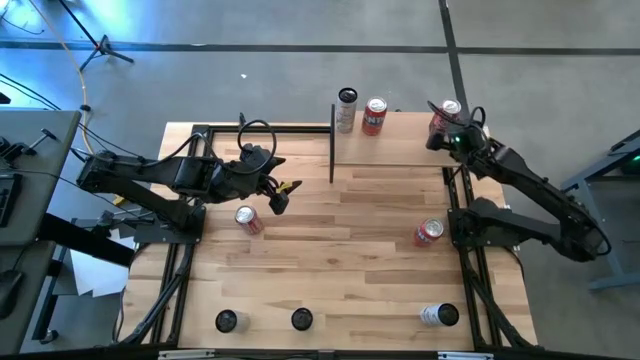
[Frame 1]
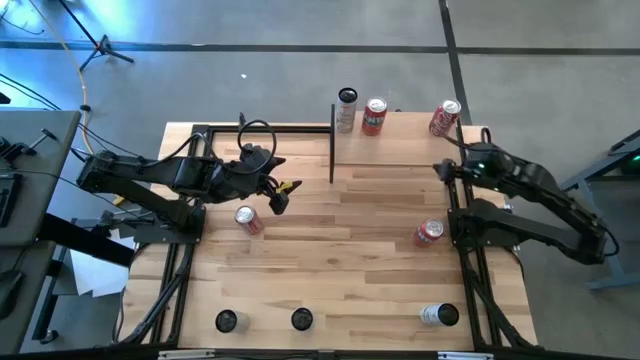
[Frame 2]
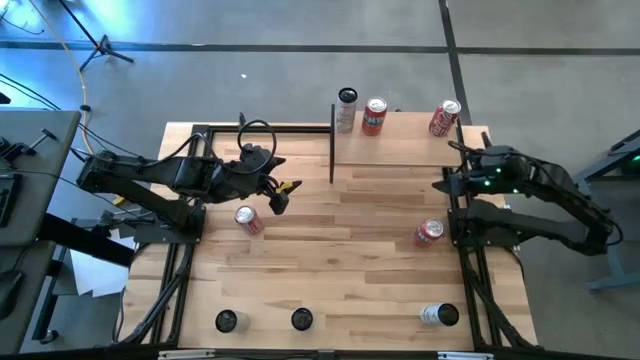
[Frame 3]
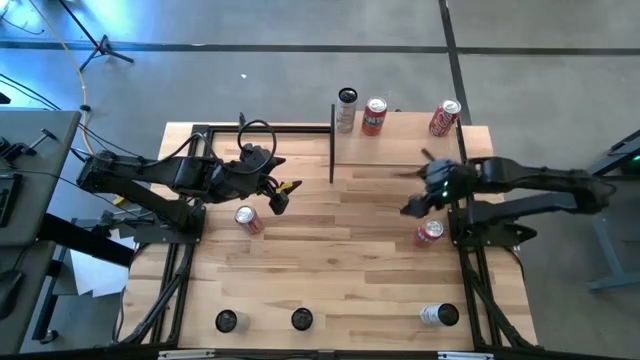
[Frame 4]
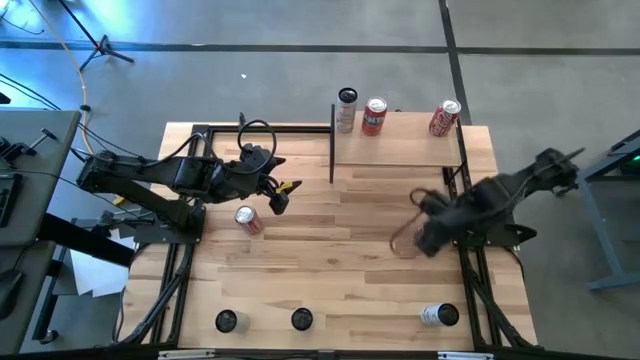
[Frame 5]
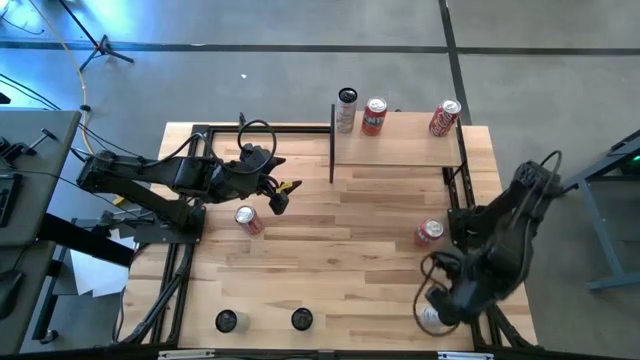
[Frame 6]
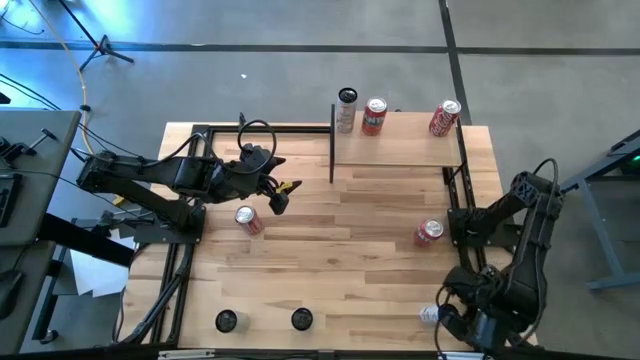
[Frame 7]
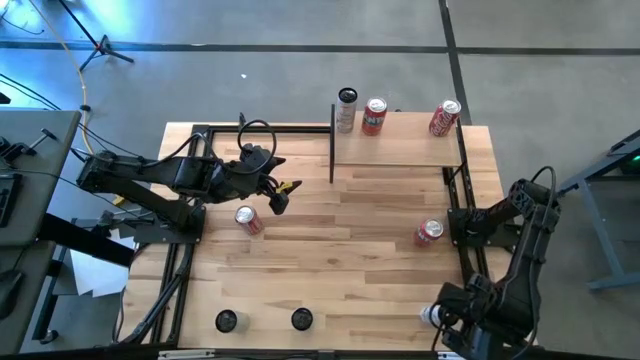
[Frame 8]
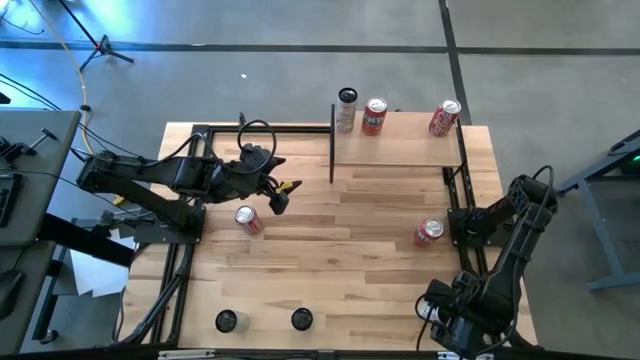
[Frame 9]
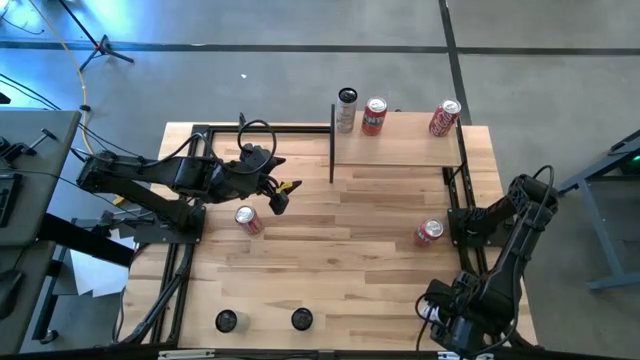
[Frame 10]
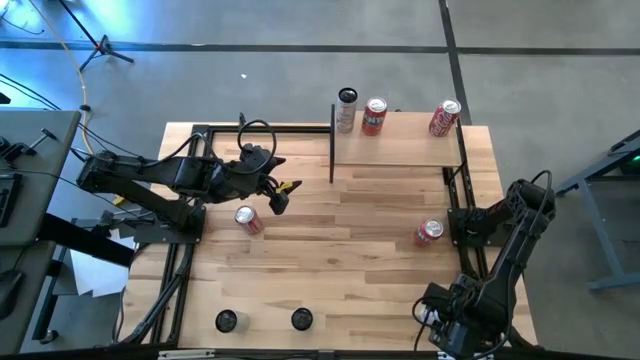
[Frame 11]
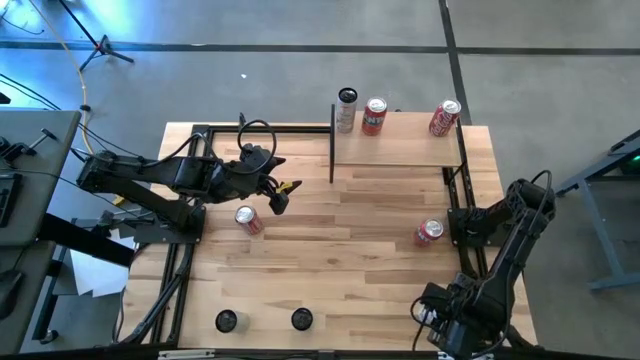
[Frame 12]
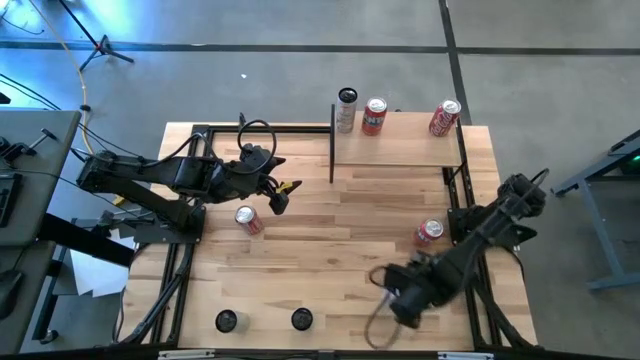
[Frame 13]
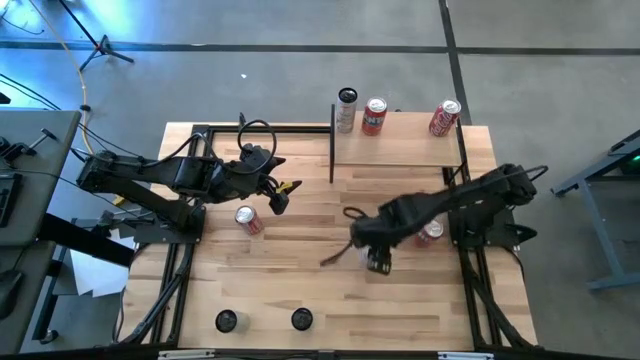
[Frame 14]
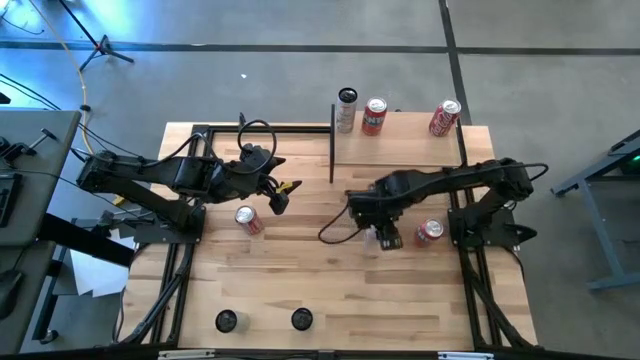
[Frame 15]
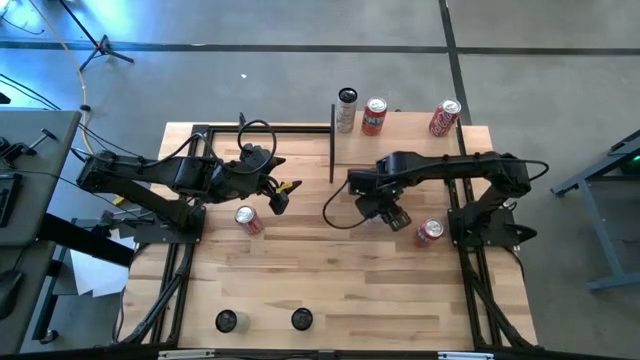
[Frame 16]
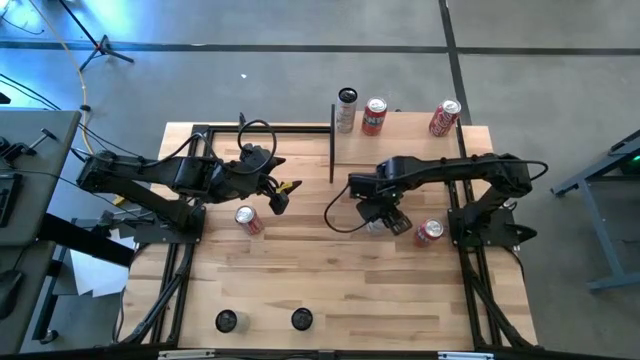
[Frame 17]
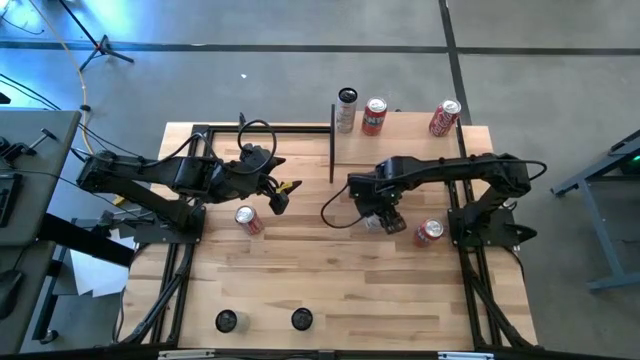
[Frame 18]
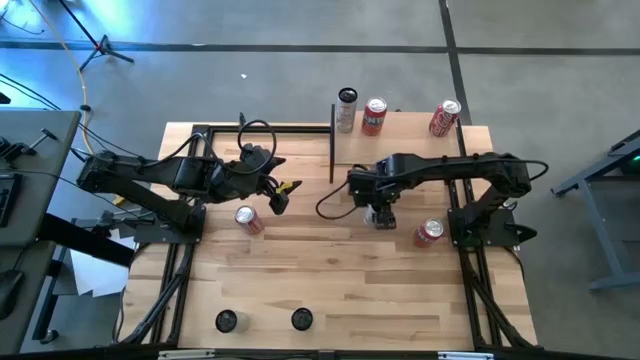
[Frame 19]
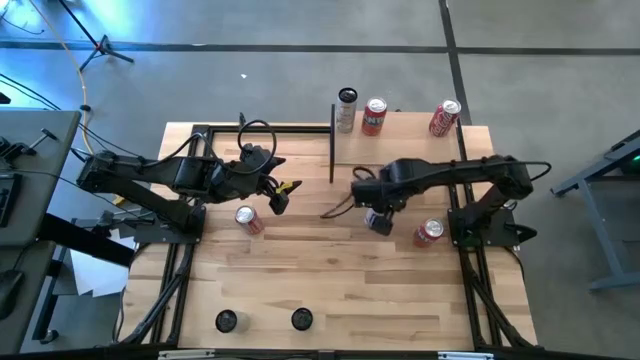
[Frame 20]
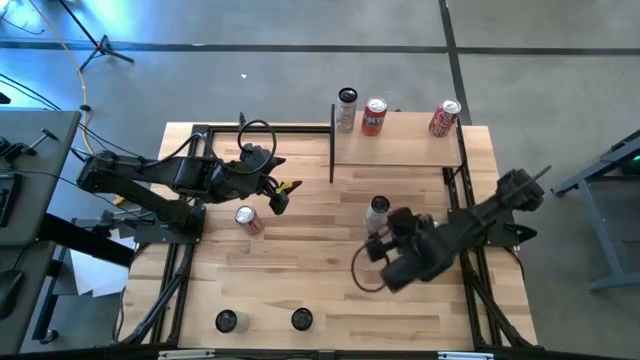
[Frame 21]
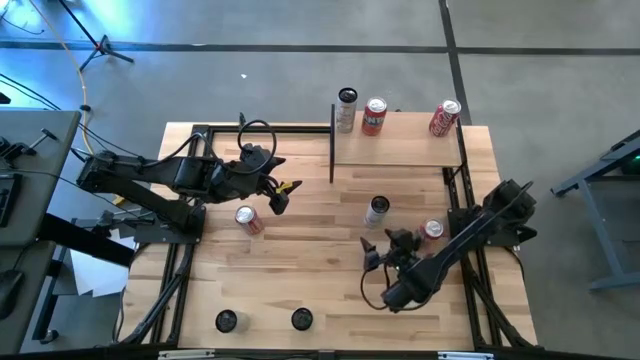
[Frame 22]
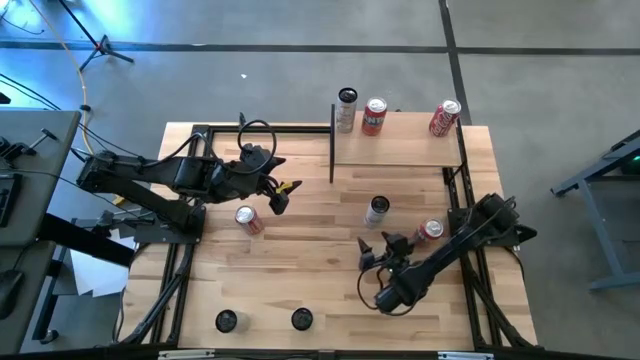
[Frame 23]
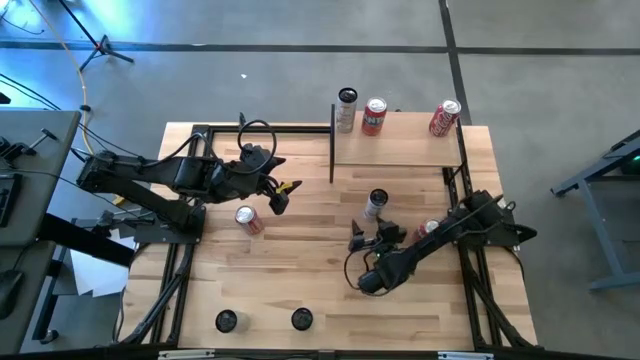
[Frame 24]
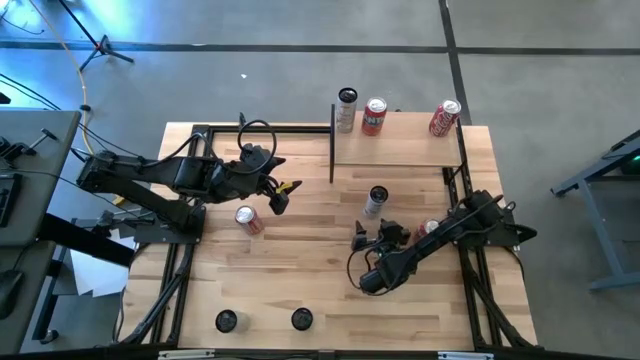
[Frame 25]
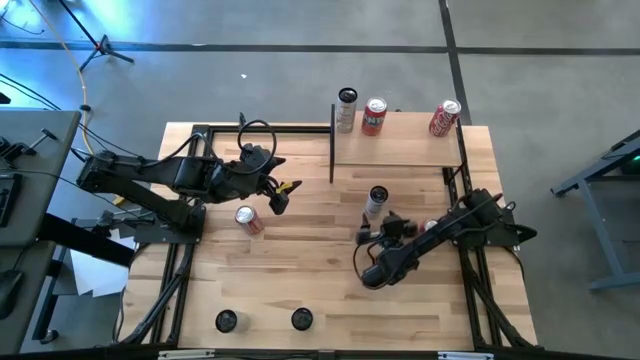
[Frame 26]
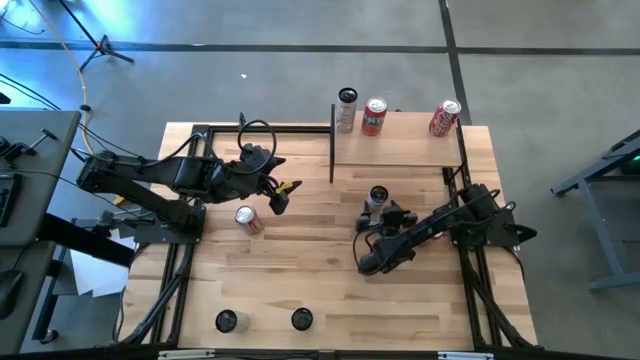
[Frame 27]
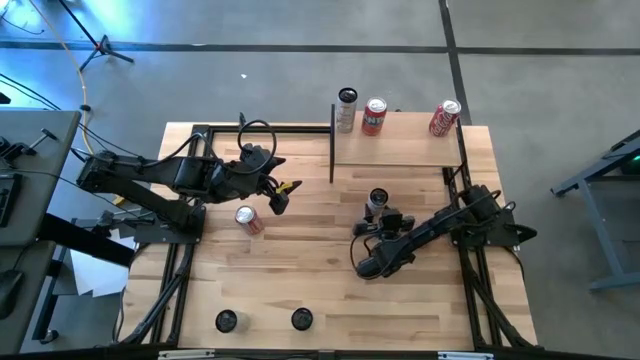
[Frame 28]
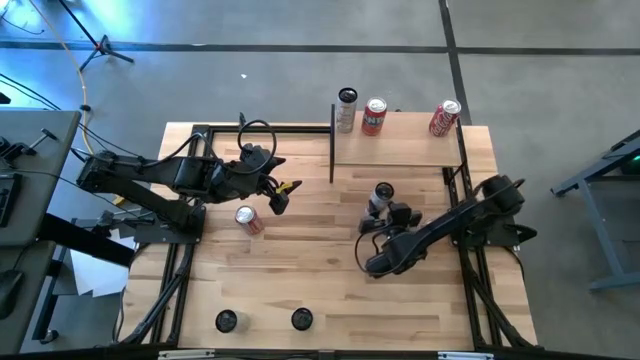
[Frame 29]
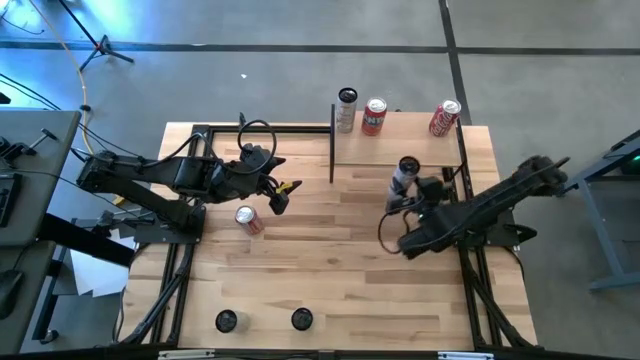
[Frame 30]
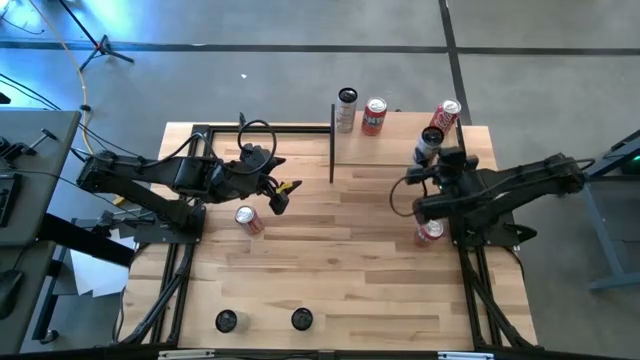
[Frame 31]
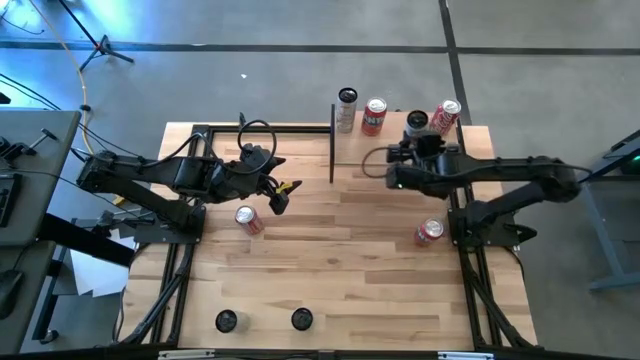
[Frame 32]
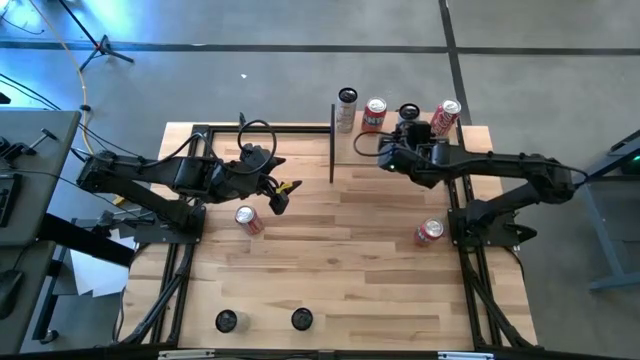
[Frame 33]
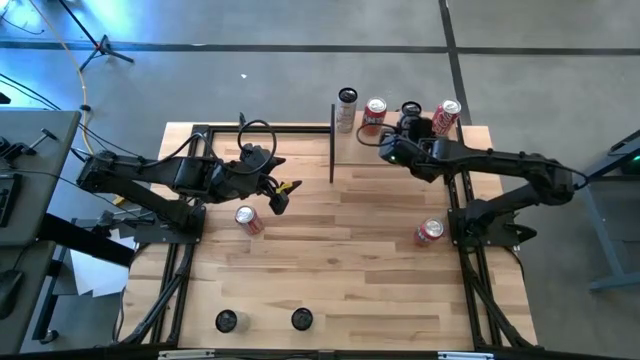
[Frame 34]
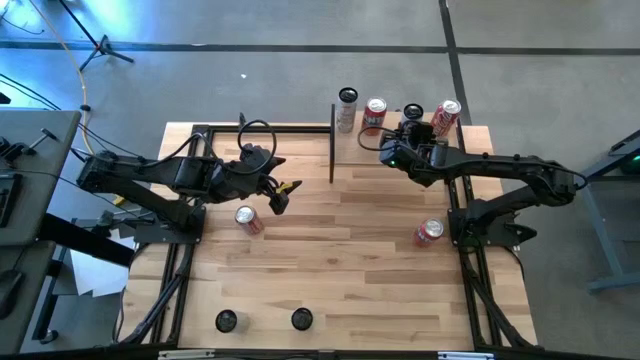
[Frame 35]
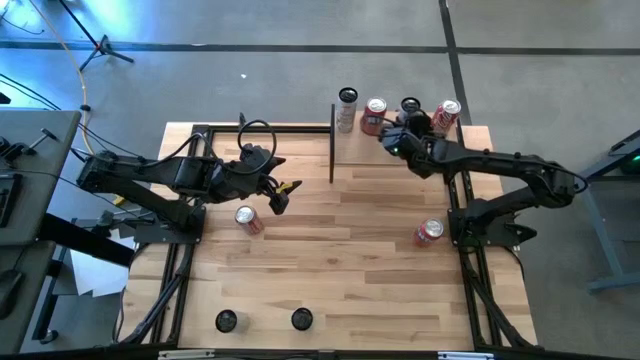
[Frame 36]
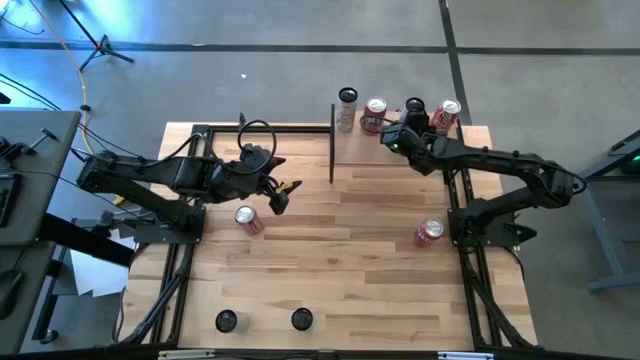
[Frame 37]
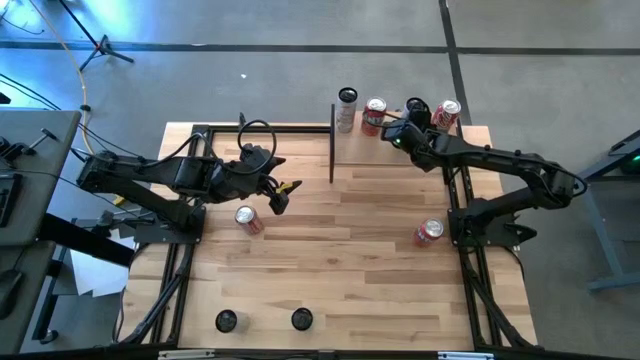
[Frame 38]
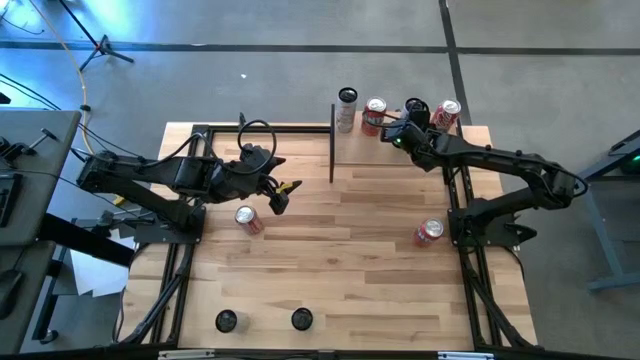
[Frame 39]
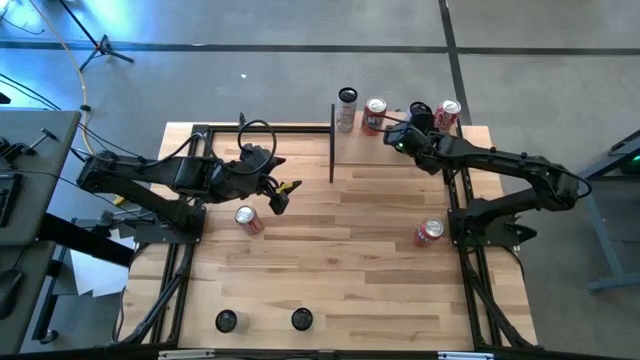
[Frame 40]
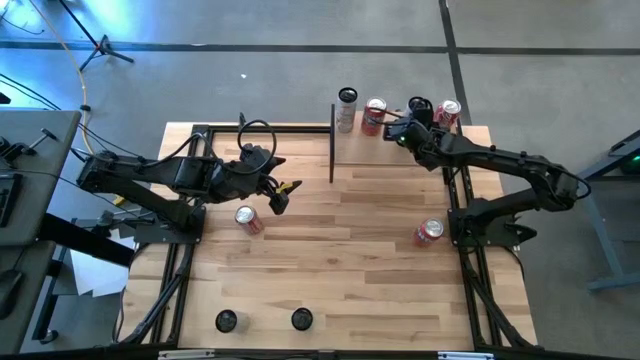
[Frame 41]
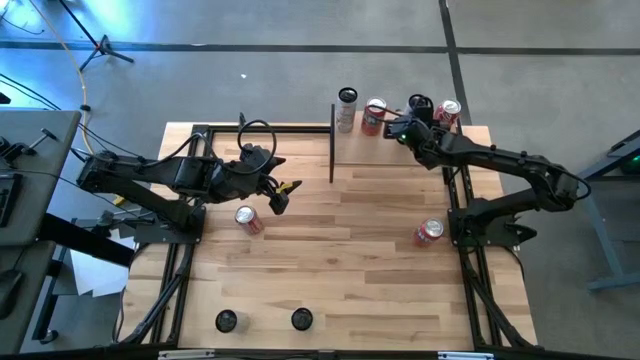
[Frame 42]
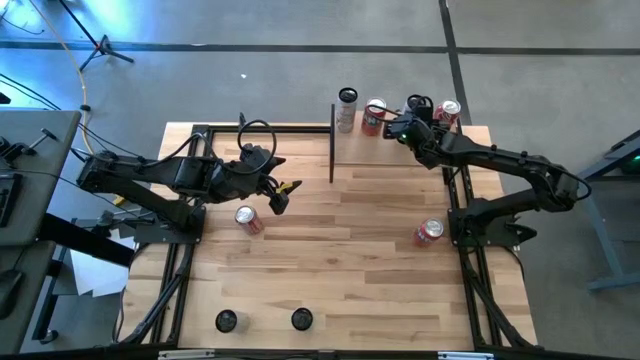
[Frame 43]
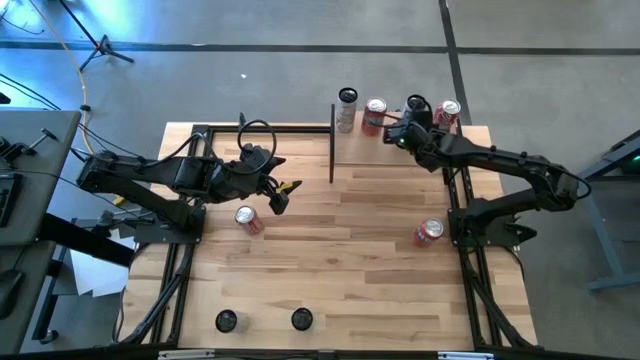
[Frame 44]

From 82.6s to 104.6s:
Task: Place canned beverage on shelf
Put the right the white blue soda can on the shelf

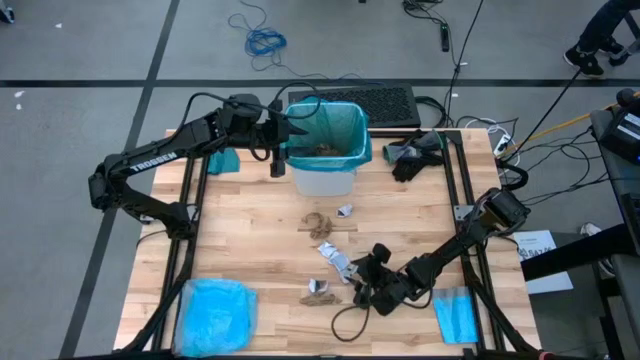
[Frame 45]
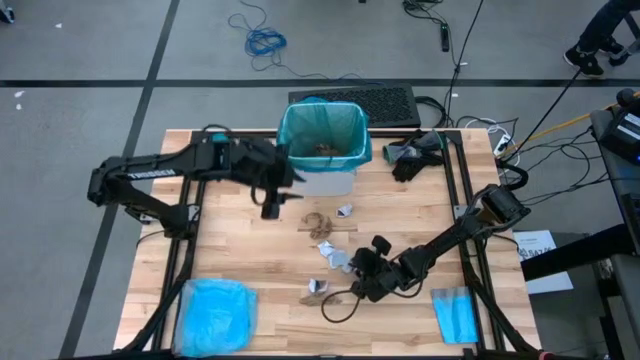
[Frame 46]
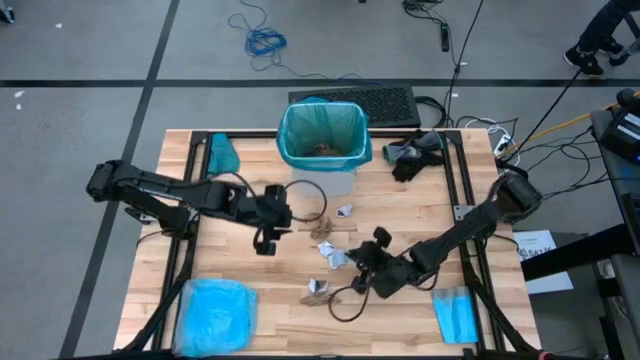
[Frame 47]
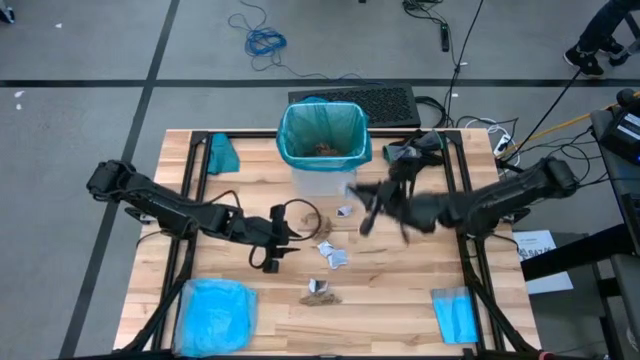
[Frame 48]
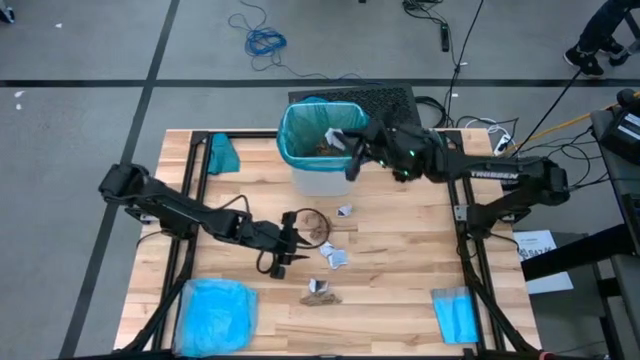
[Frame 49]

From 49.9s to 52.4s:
Task: place trash/remove bag and relplace
Put the white paper into the trash bin
